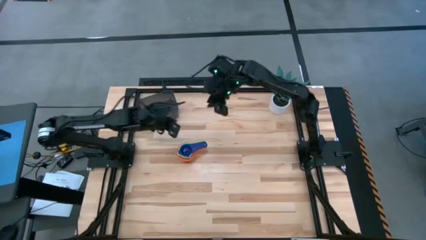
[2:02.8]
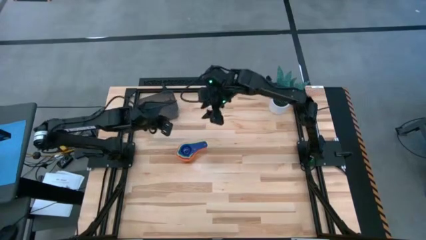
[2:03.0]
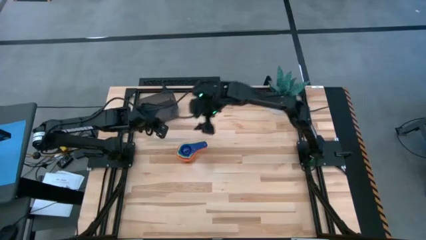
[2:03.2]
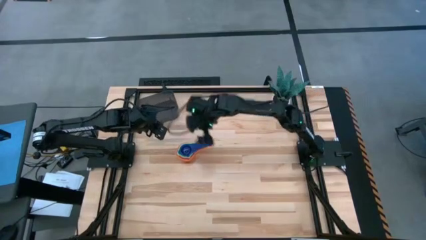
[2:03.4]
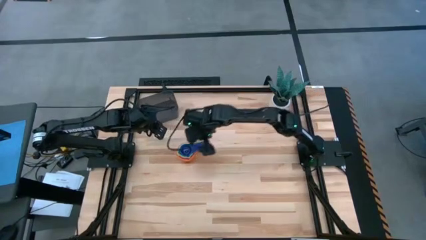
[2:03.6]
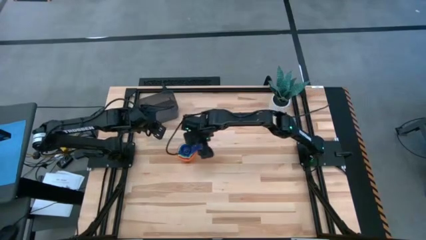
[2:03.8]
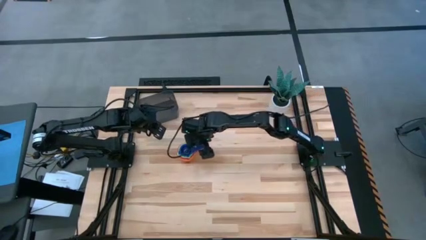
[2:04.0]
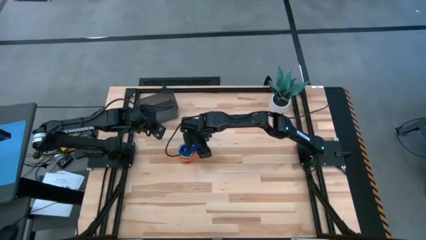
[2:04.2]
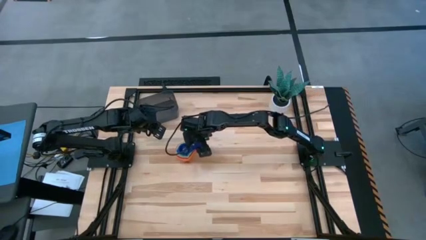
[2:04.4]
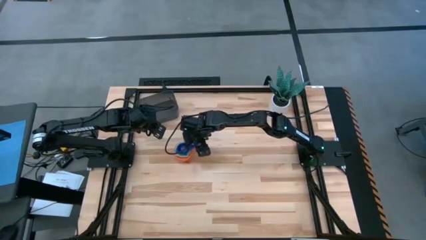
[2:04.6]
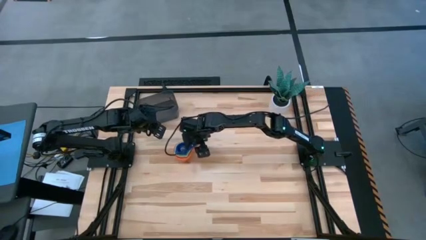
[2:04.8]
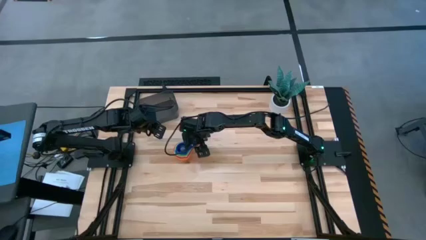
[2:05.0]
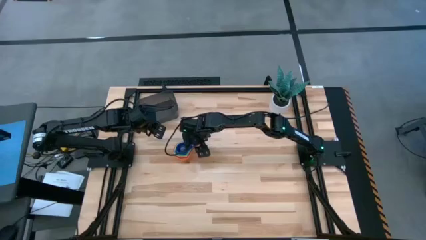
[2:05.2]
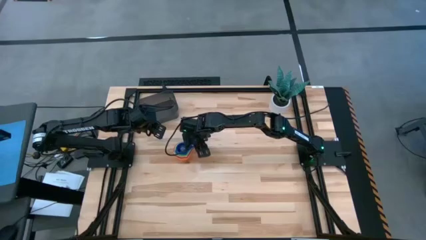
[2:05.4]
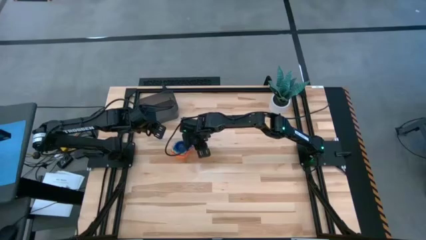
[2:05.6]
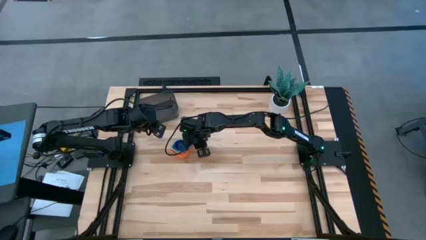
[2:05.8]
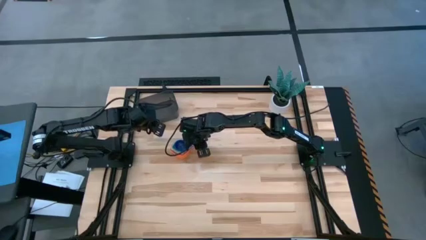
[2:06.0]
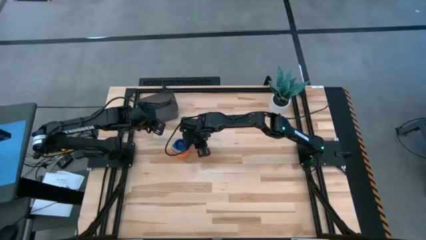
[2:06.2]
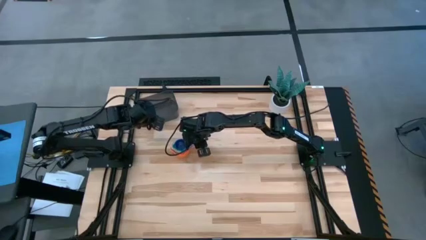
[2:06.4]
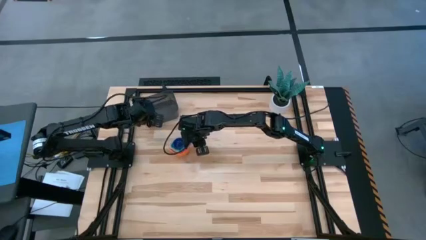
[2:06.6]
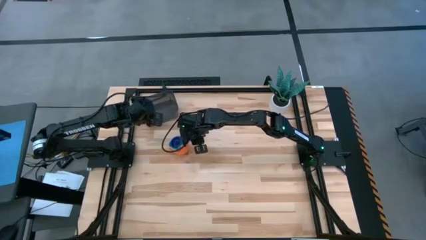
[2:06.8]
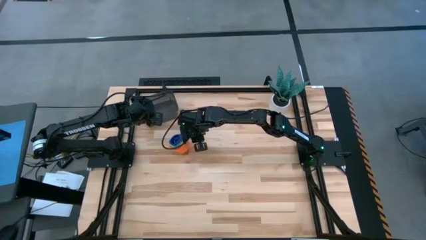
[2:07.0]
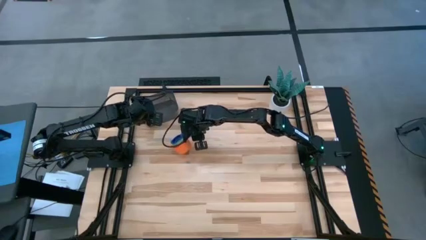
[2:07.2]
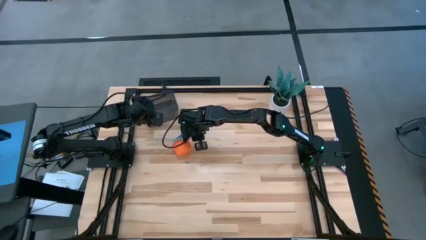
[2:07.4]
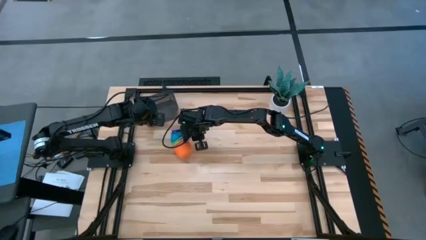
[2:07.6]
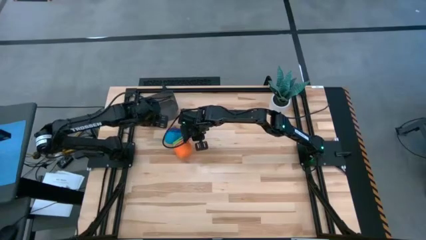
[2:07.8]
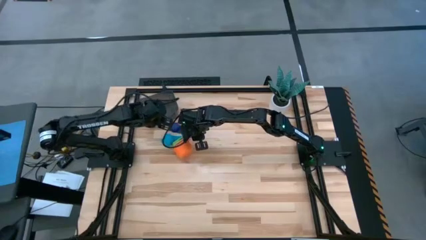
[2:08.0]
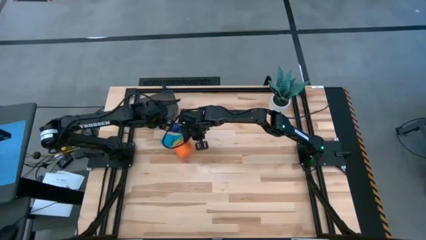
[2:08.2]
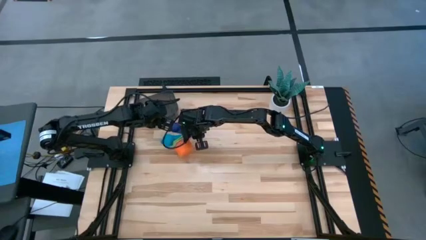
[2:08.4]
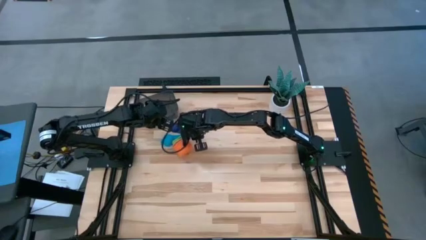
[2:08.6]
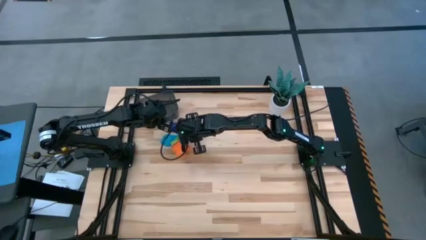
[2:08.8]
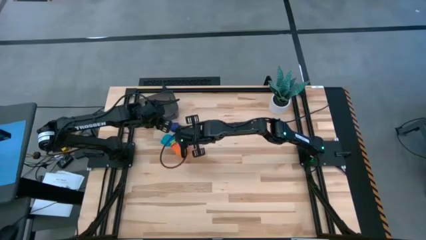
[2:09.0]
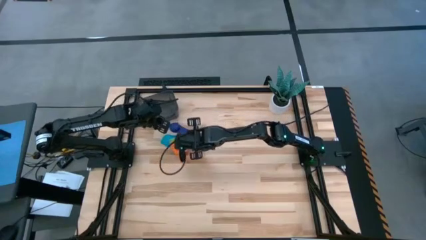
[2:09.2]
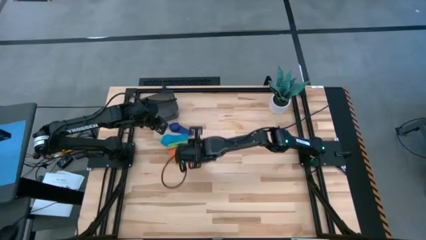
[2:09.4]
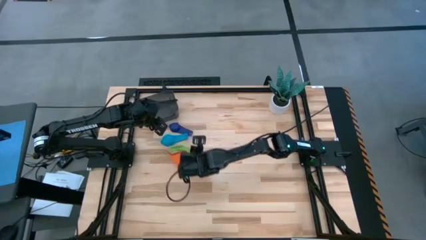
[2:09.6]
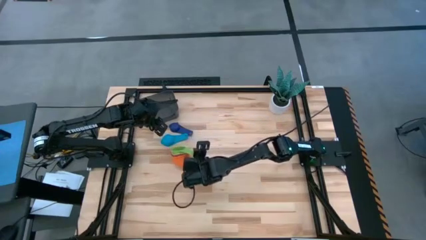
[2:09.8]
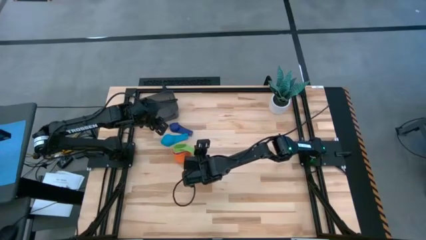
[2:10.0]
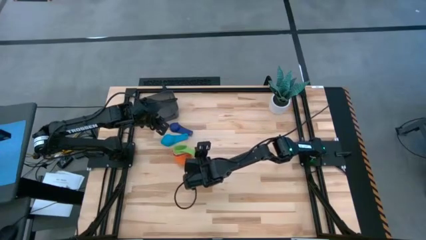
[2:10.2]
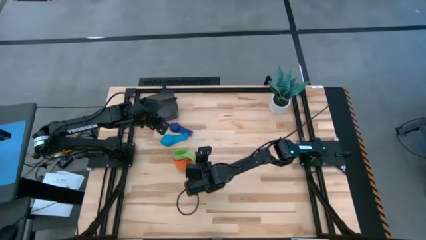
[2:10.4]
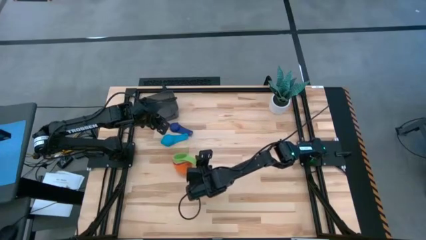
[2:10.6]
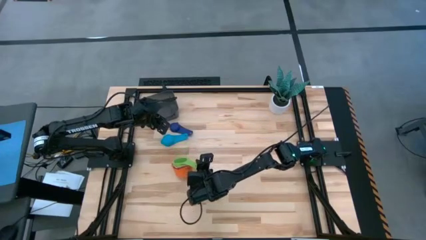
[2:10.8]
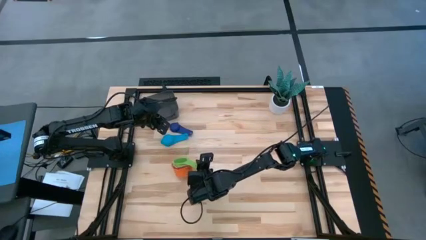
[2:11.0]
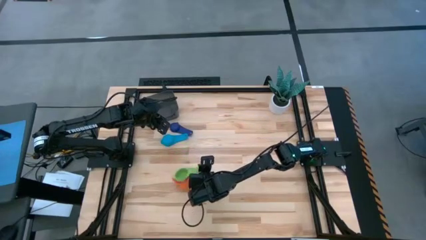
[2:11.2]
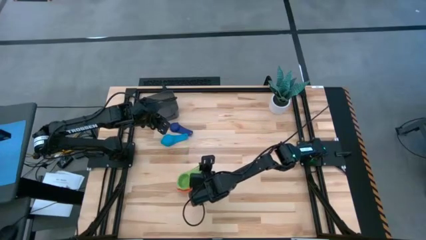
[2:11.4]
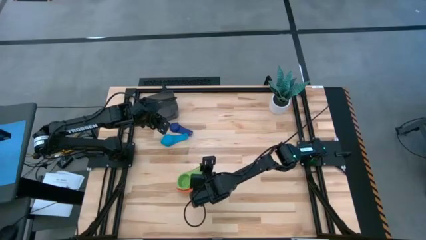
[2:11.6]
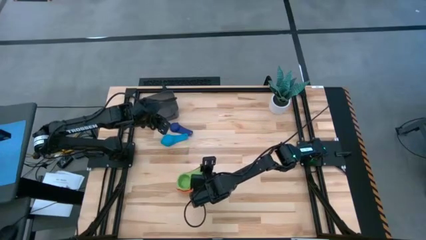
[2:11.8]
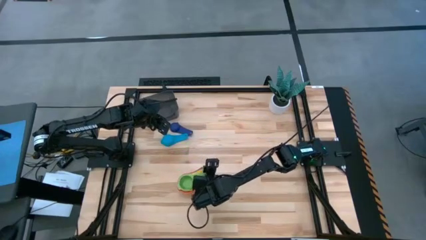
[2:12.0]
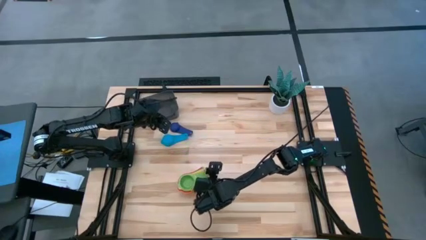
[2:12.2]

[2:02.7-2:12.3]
Task: Nest measuring cups in basket
Put the colored stacked measuring cups into the black transparent bin
